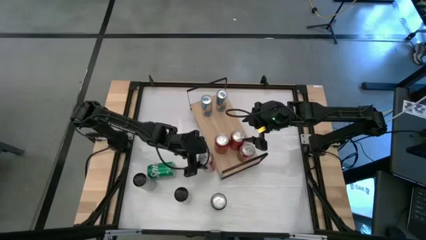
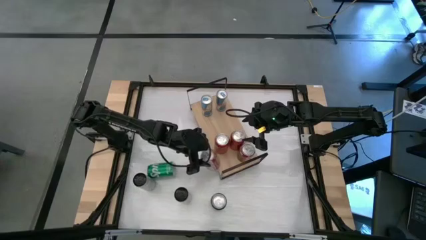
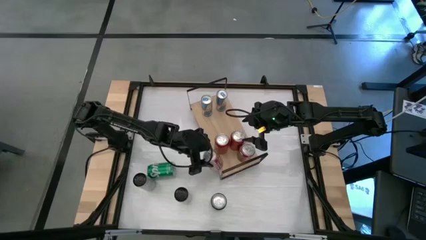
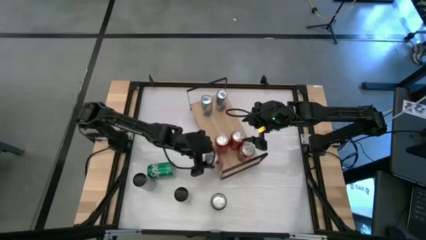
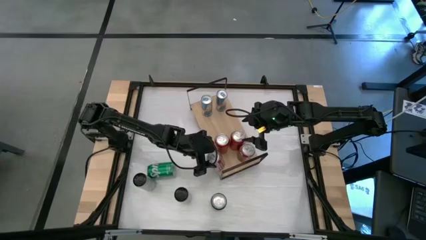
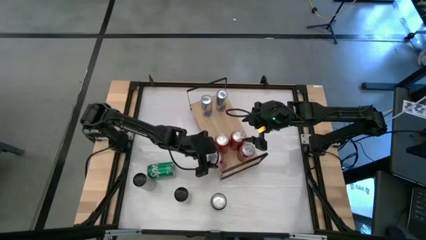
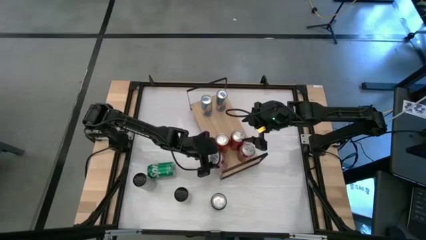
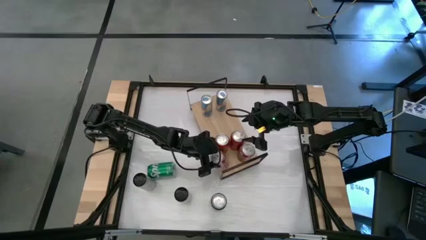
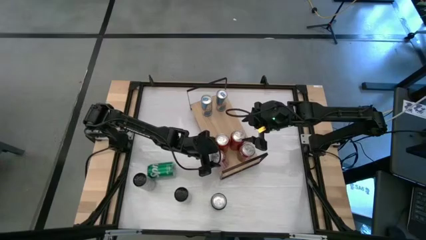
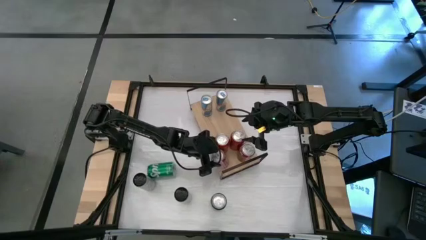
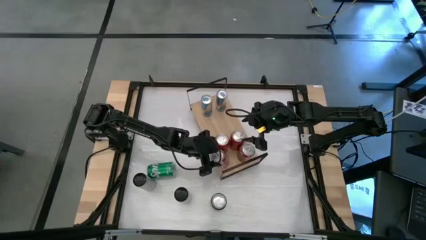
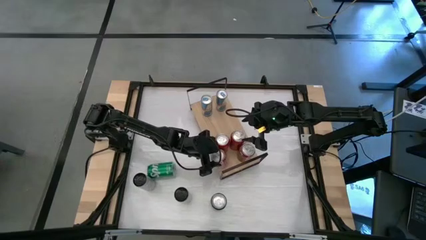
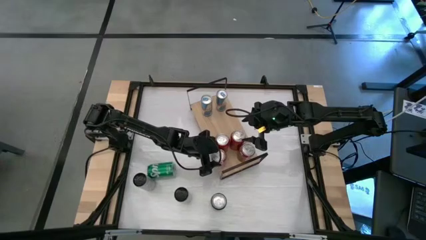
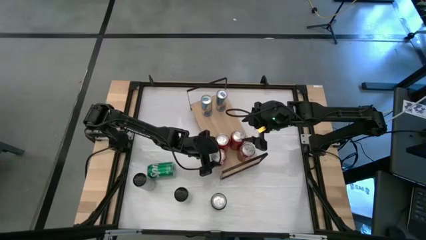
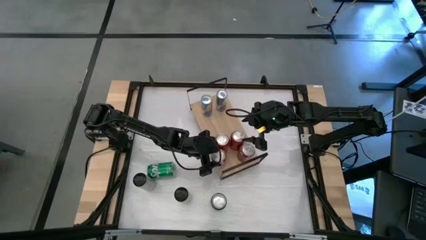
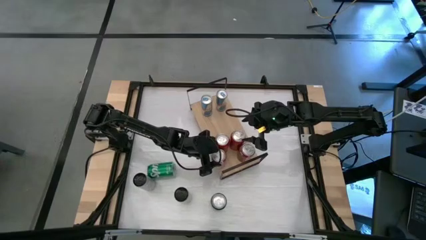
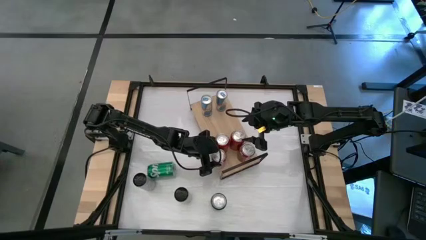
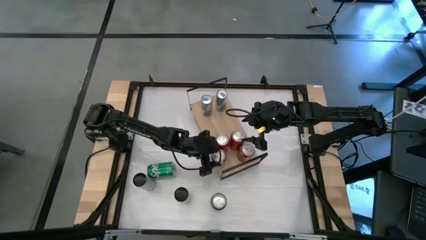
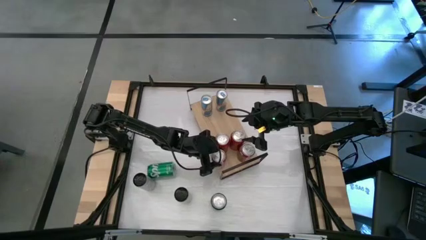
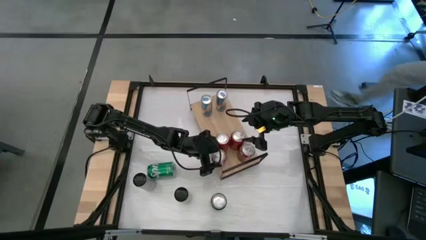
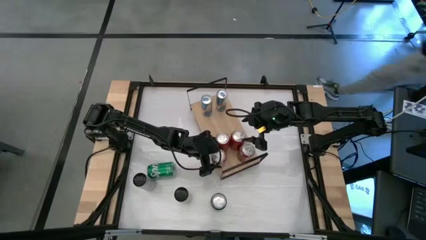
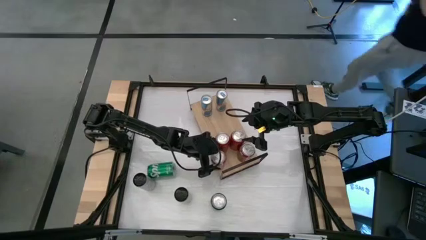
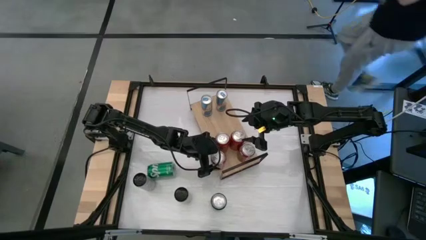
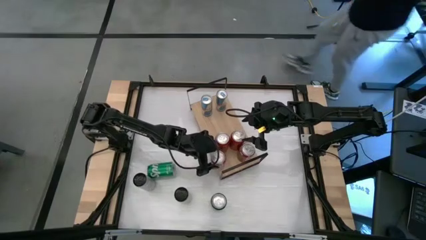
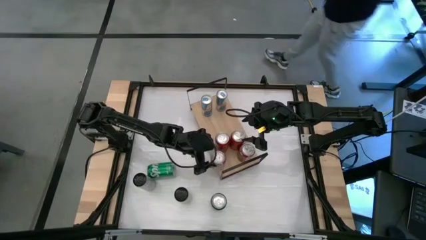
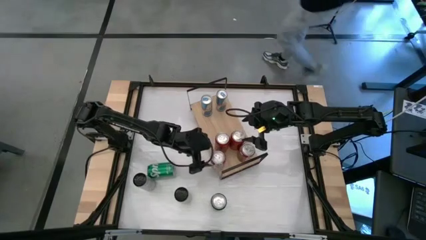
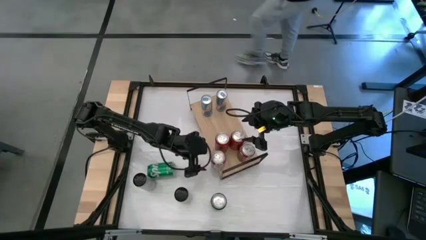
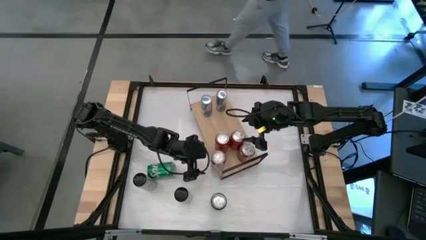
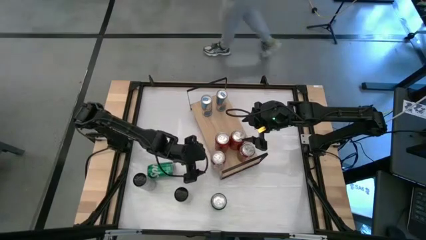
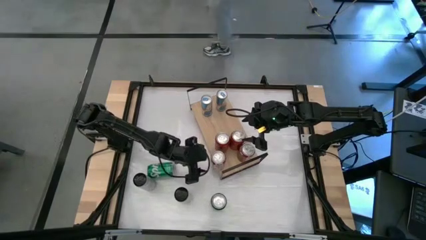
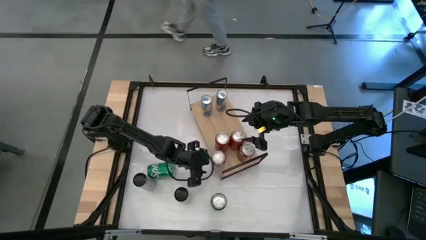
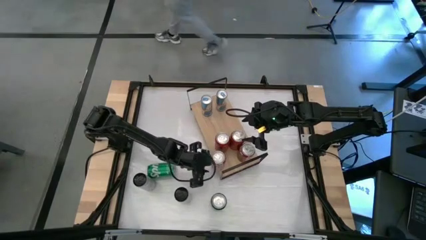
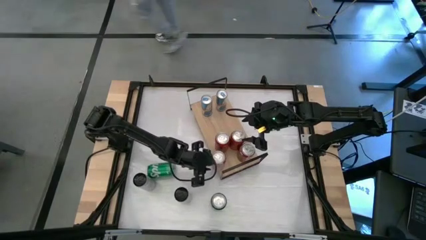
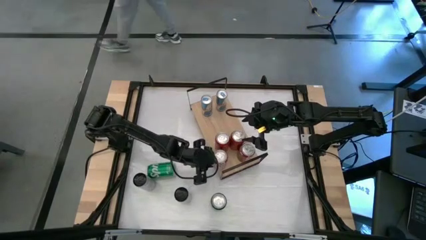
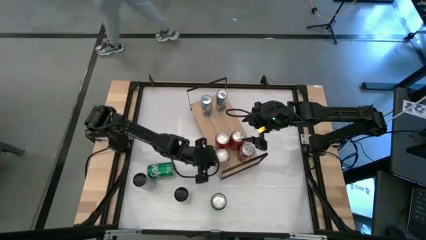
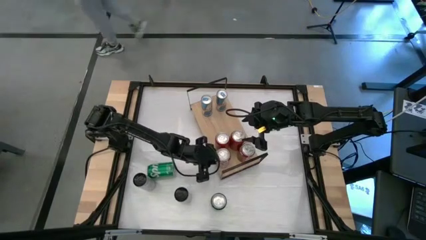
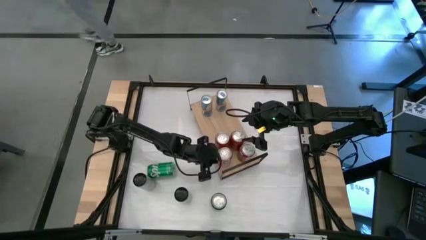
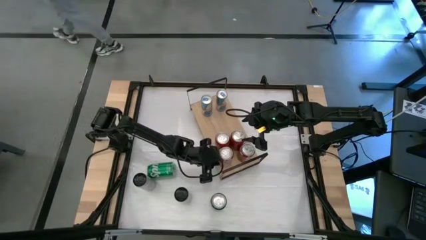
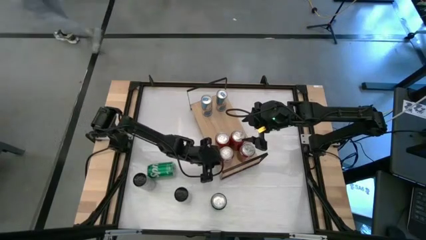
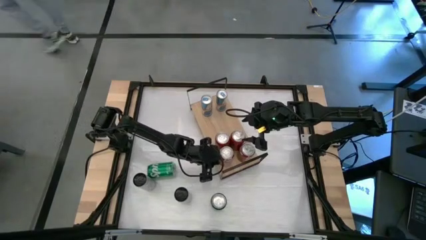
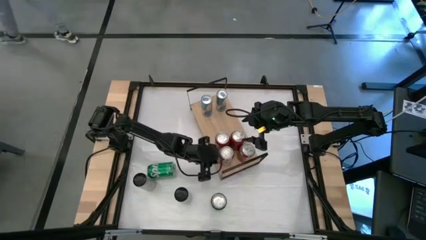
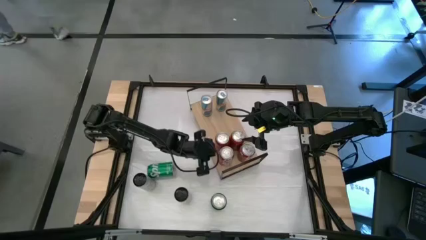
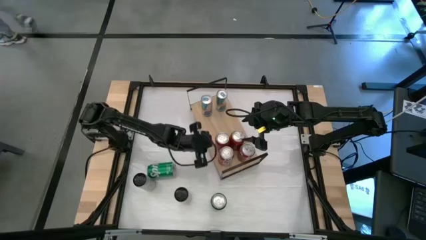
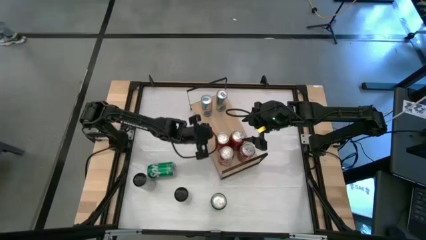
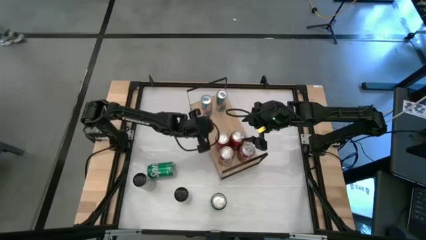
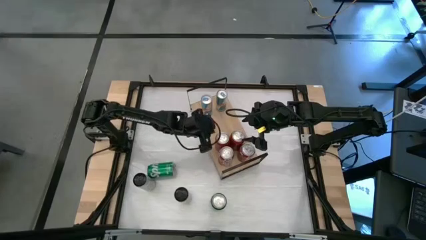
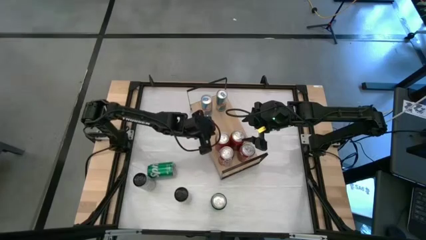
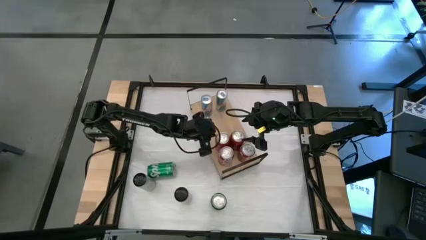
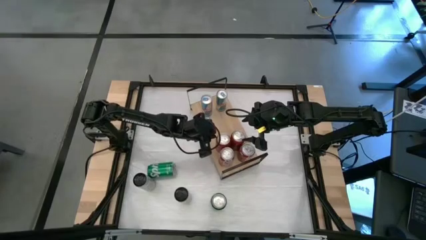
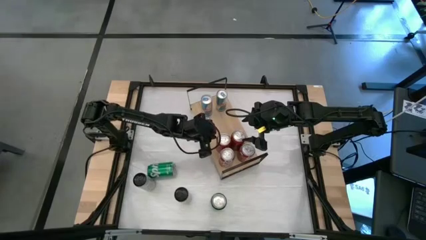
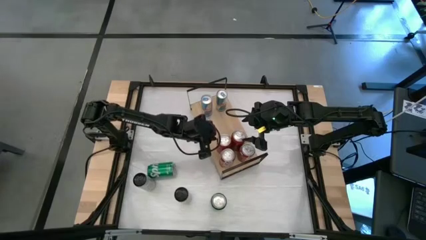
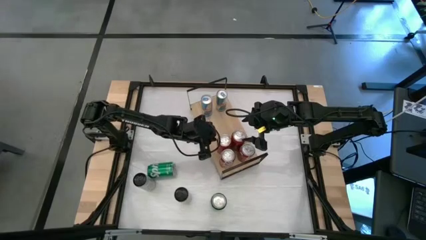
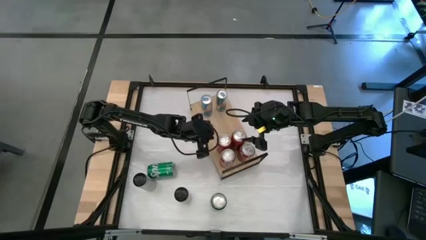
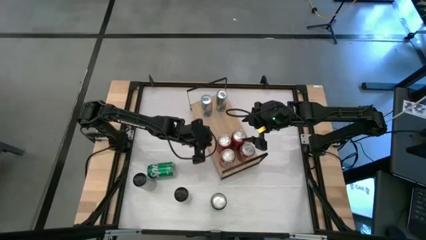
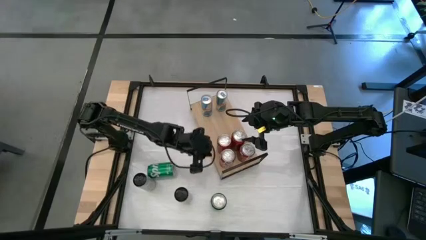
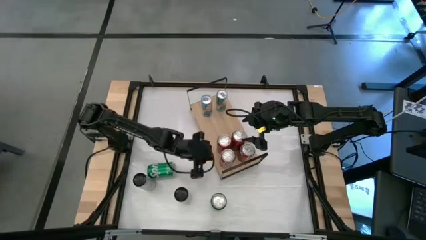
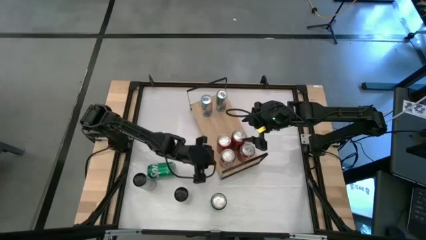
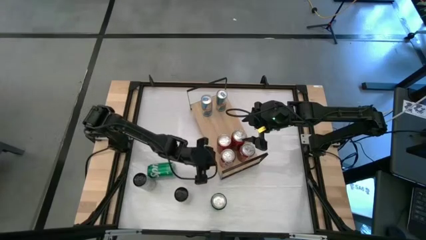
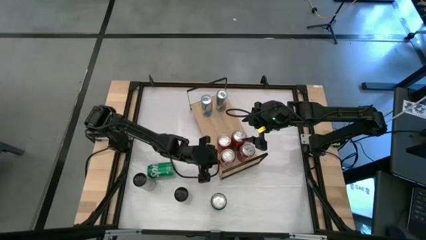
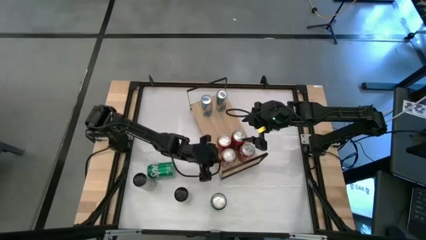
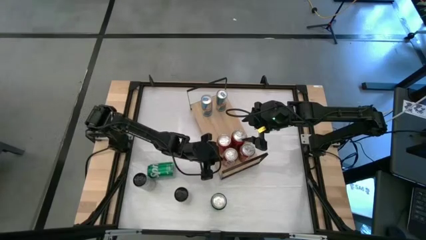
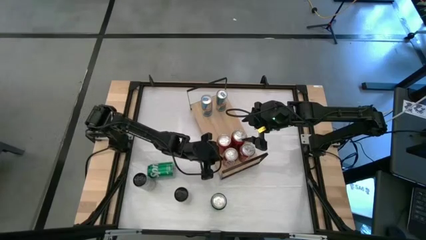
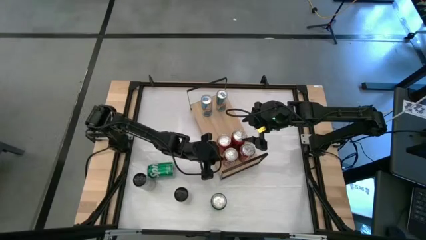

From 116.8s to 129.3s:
Task: Place canned beverage on shelf
Put the red-white soda can on the shelf aligned with the other red-white soda can

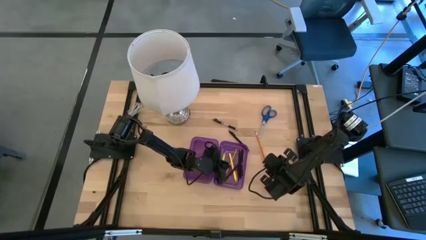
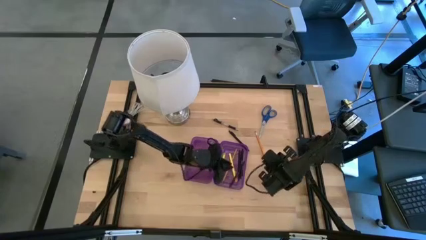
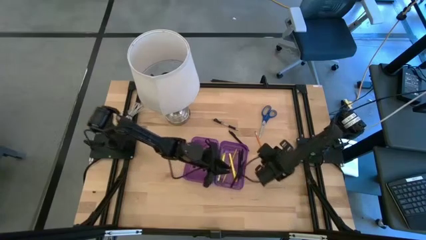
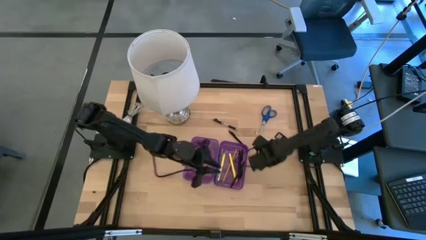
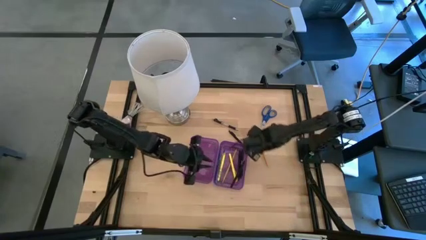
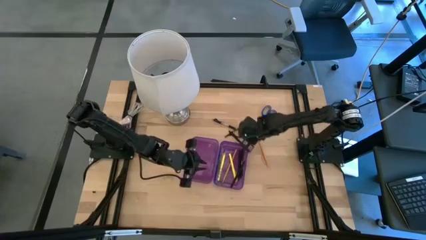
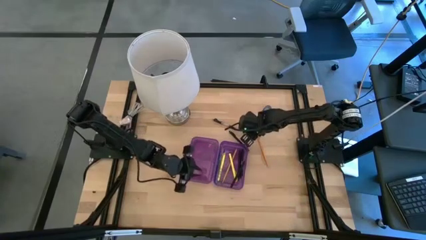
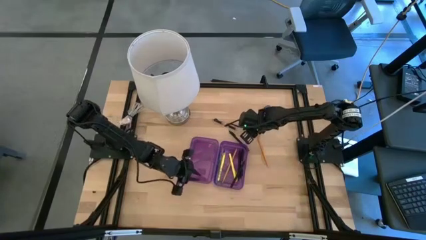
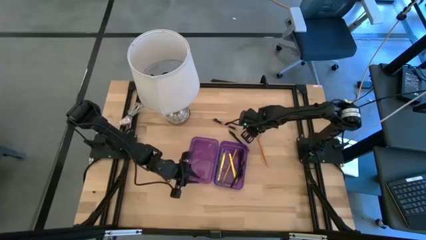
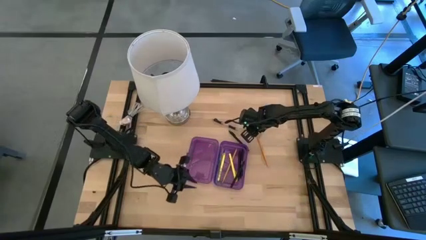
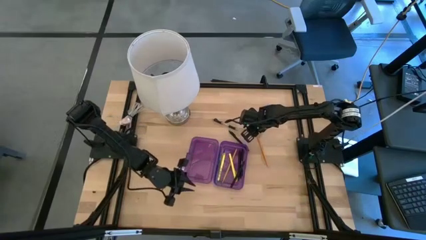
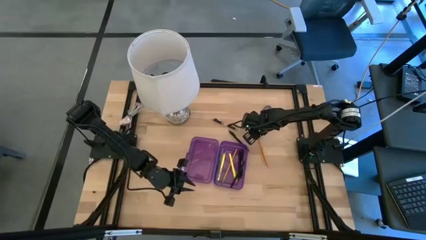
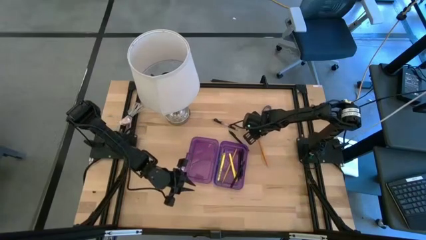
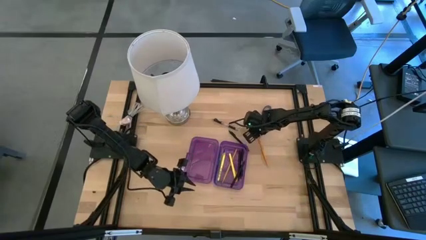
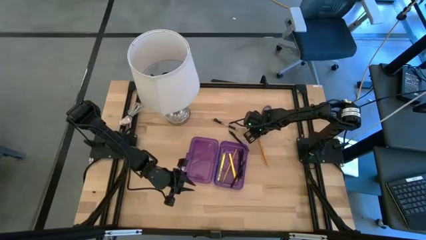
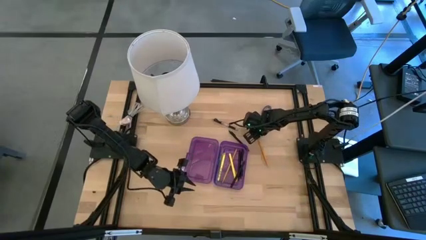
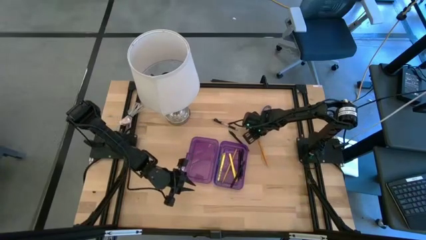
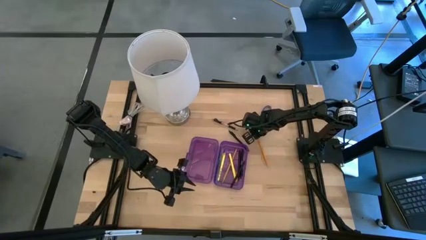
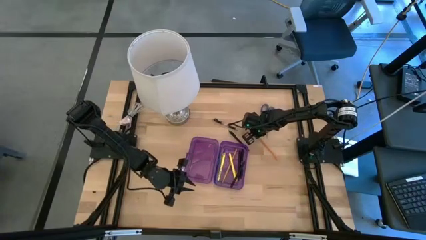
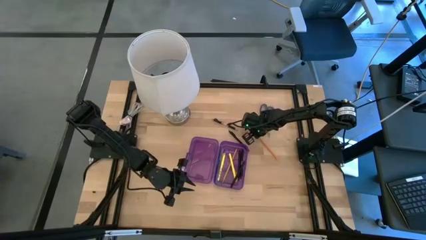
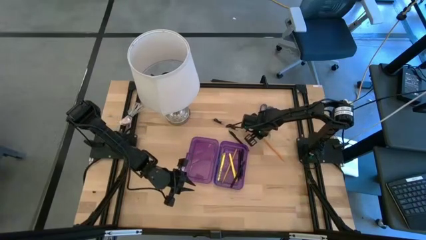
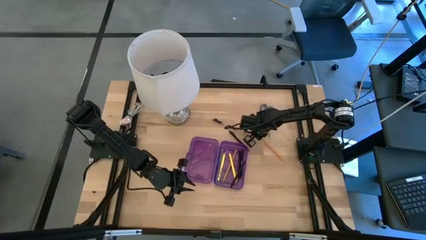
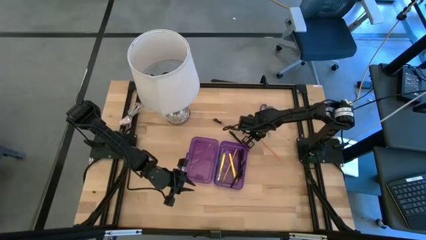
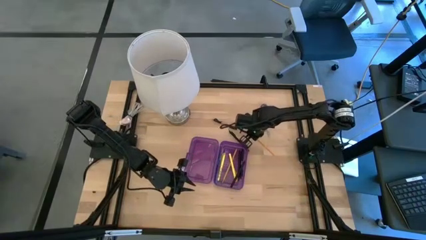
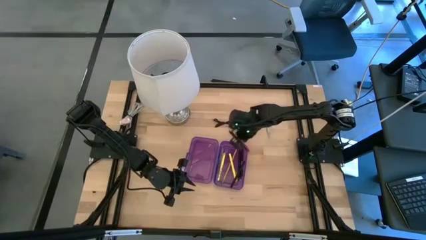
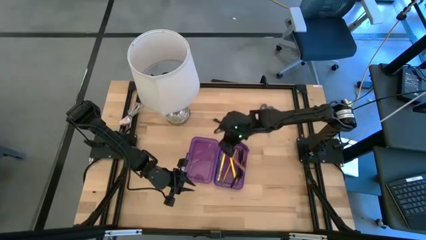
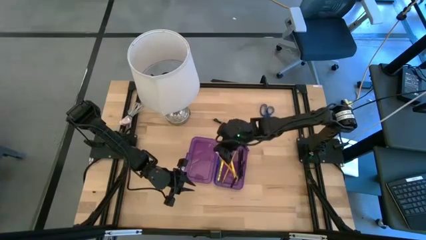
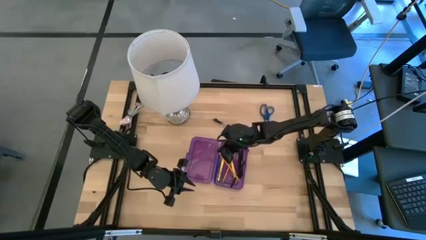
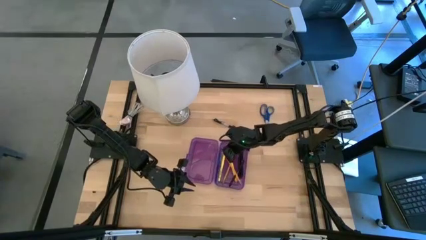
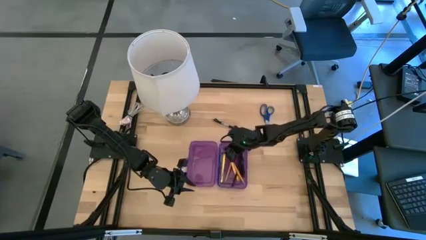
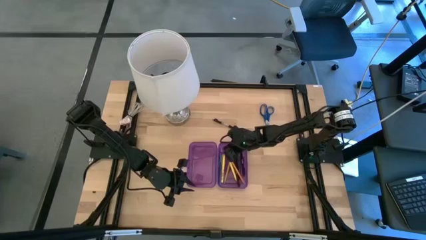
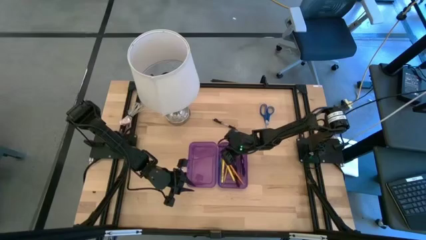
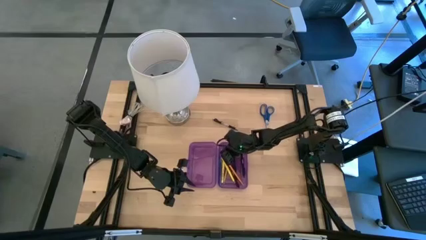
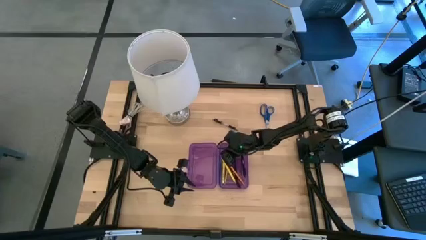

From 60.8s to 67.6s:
Task: Pick & place school supplies into a supply box
Put the orange pencil into the purple supply box
